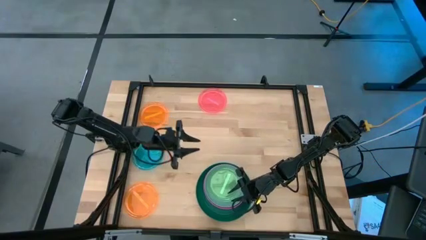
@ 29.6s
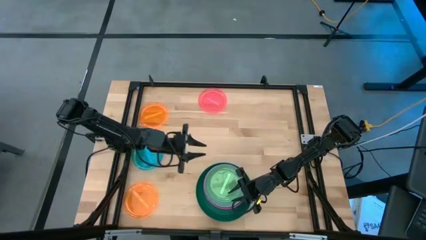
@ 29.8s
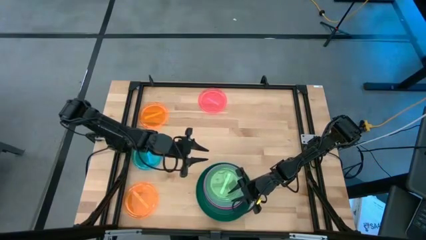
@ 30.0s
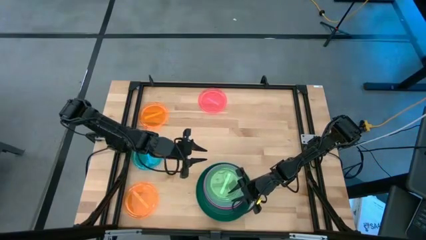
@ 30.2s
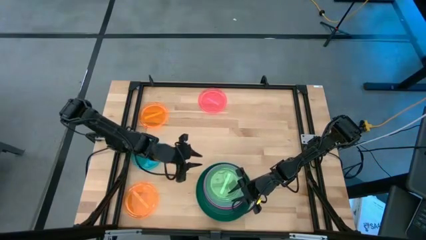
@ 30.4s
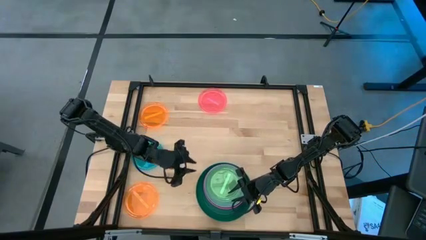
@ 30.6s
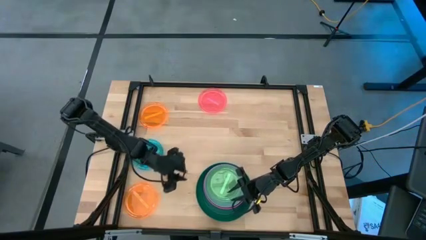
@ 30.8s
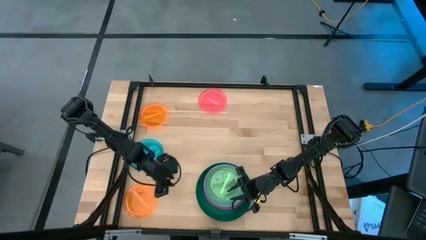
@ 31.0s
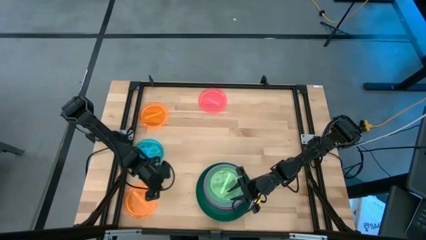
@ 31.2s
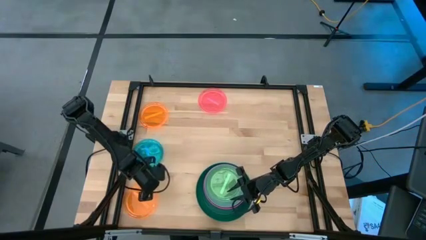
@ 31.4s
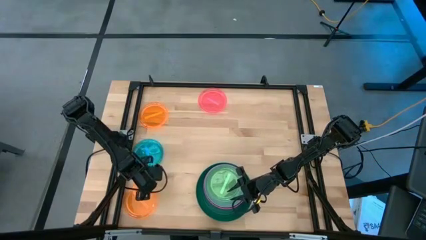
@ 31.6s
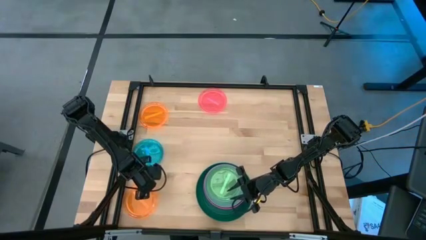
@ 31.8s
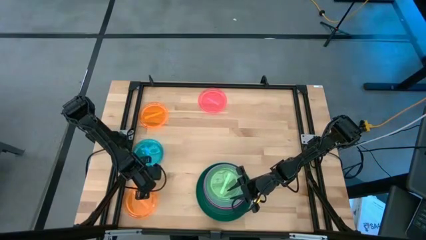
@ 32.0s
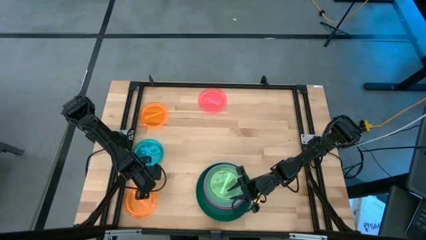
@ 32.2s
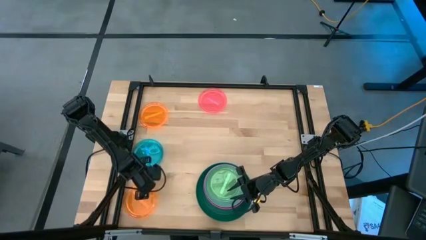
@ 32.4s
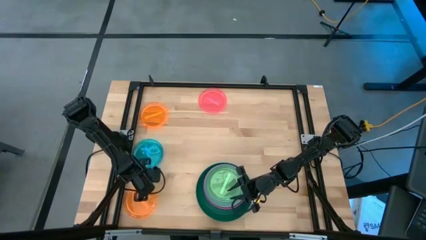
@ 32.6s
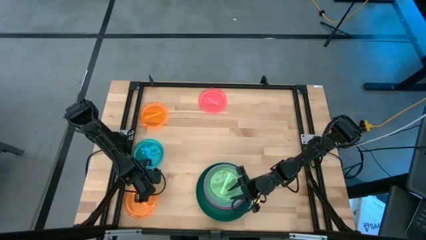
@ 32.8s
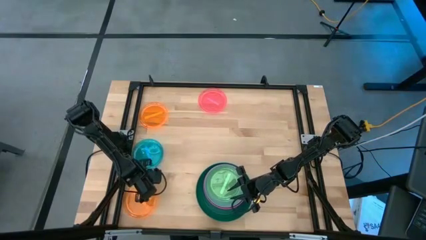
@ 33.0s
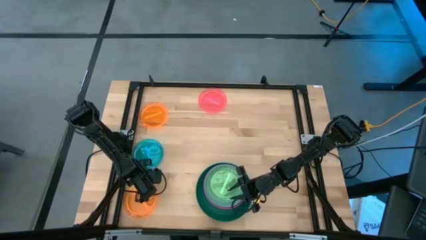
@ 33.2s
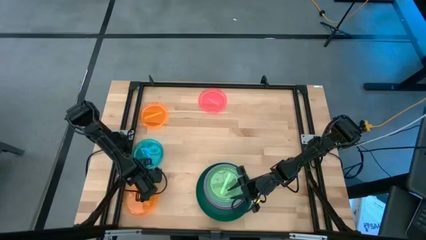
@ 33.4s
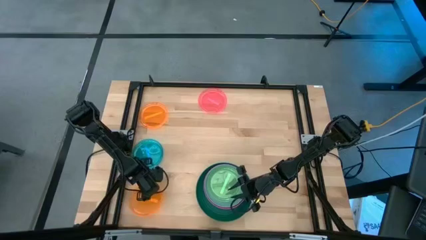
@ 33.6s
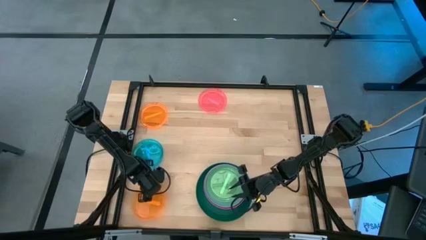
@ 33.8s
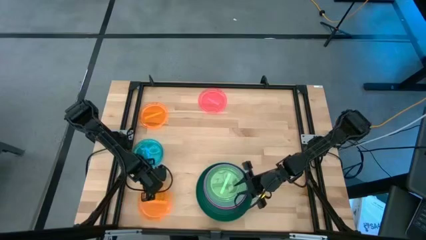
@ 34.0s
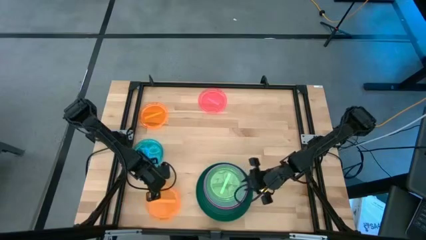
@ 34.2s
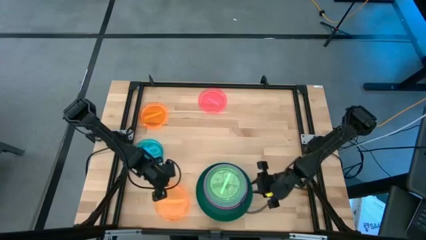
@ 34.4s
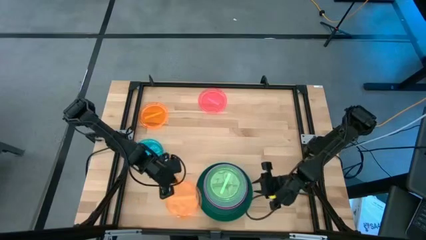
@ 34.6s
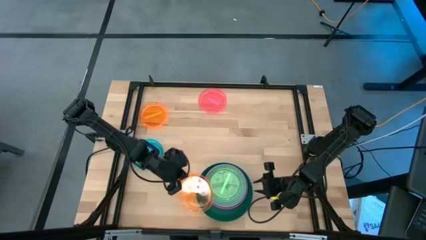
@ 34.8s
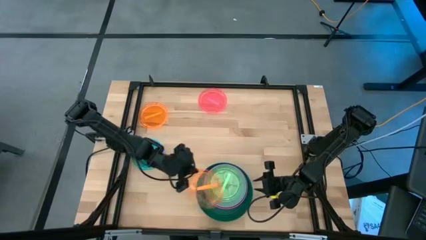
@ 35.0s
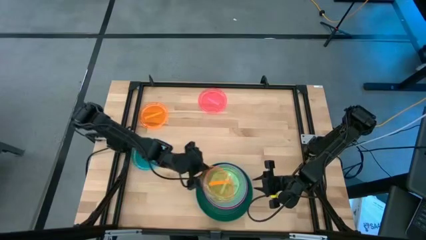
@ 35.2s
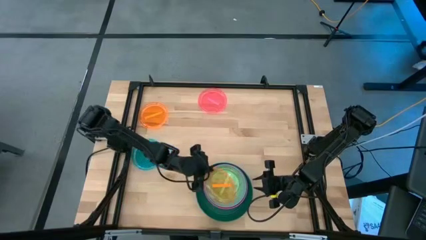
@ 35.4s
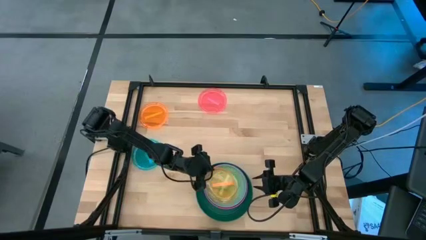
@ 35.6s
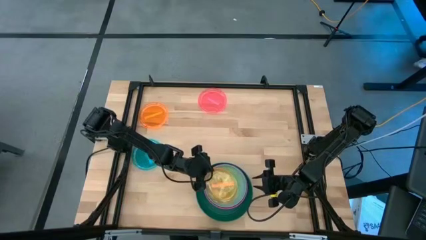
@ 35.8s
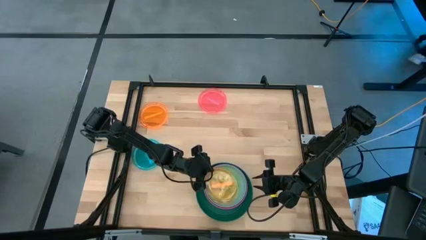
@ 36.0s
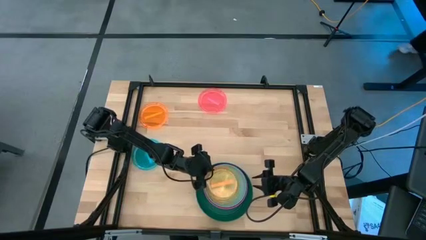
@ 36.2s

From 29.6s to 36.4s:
Task: Stack plastic plates
Stack the bottom orange transparent plate on top of the green transparent plate

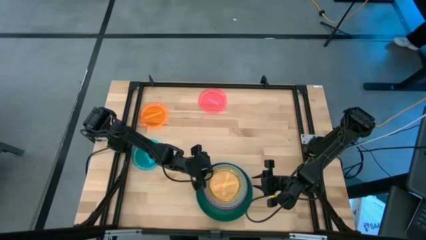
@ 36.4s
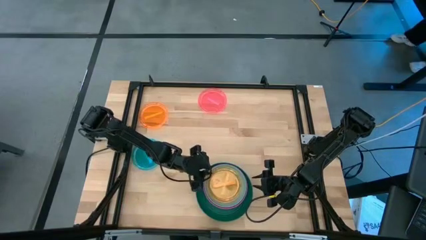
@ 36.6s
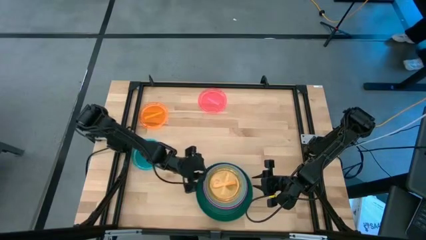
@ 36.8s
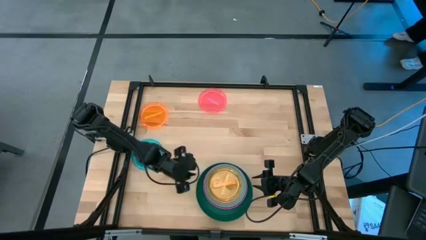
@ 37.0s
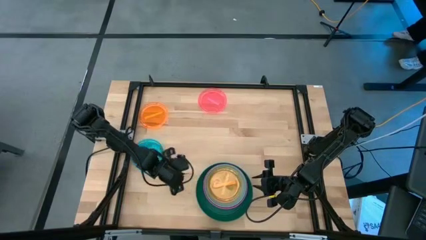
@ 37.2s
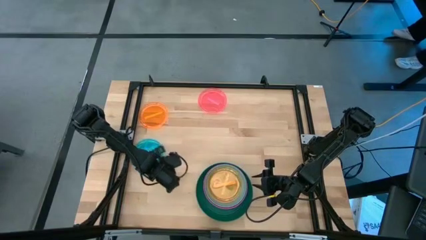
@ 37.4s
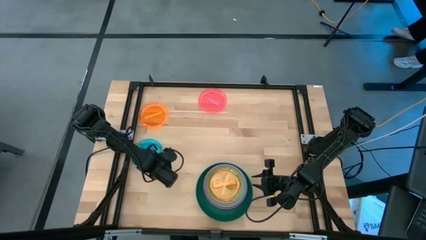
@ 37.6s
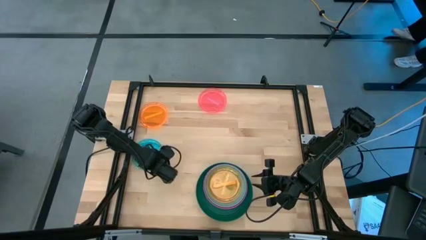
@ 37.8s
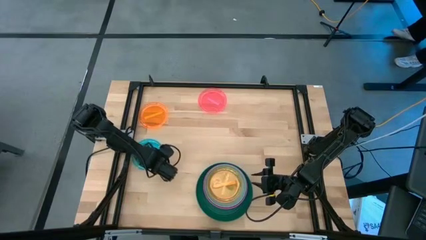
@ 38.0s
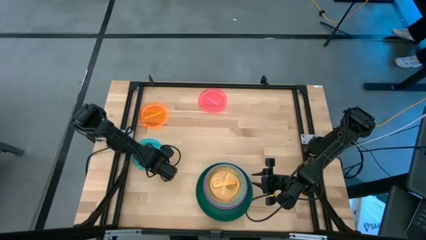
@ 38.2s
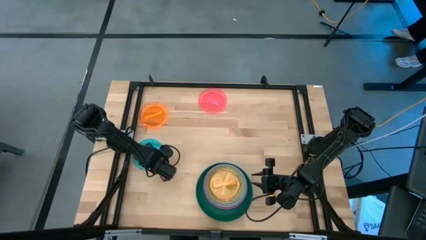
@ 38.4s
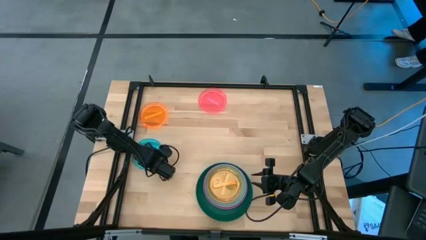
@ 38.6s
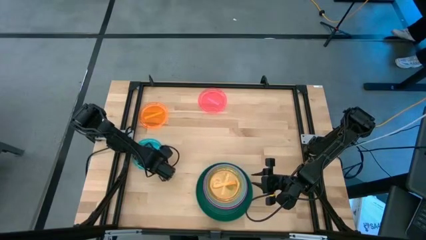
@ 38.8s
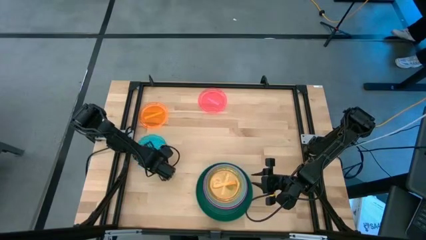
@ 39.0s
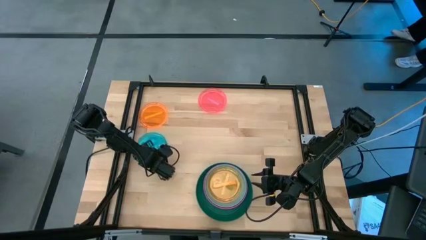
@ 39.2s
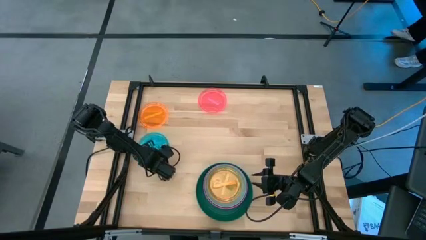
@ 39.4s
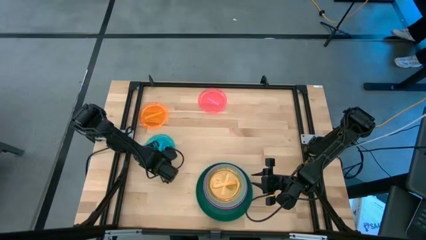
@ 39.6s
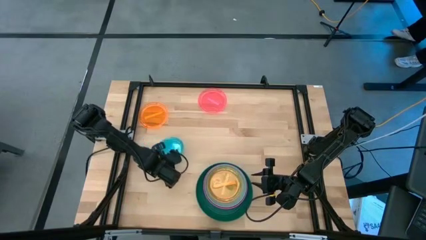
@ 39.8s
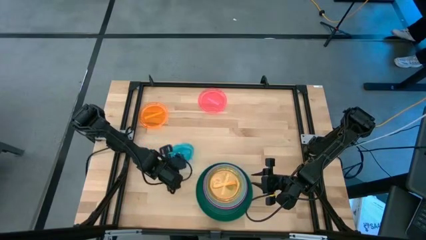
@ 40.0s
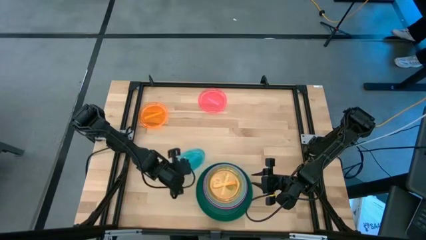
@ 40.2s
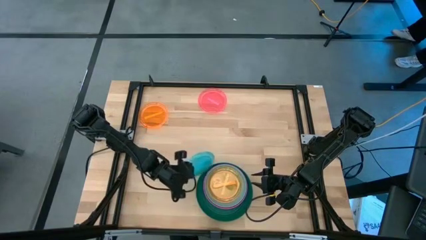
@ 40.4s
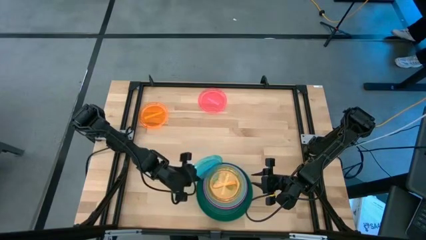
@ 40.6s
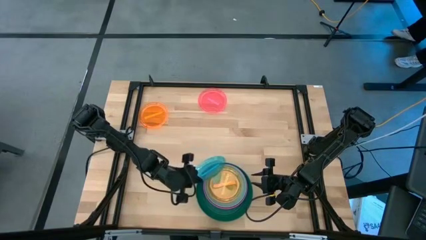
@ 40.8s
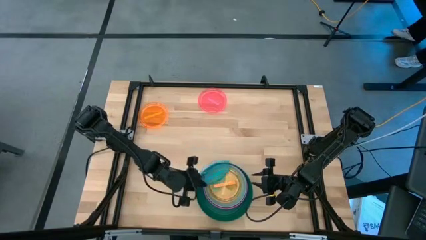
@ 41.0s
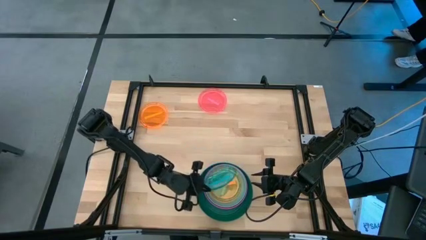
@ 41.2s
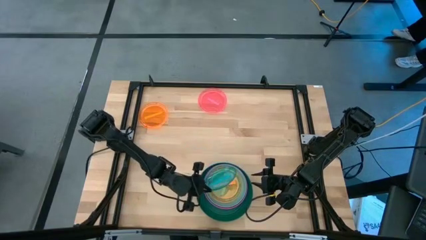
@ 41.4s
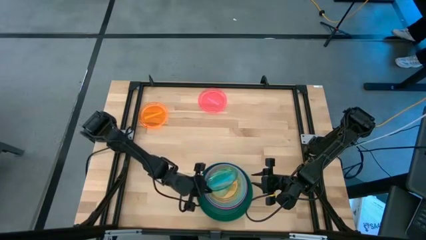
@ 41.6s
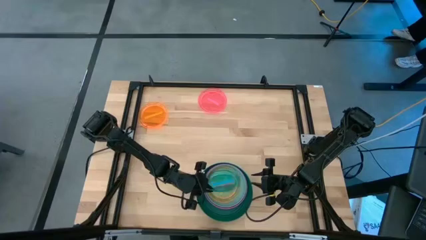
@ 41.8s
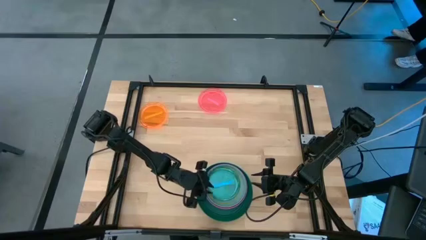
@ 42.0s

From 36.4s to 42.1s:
Stack the blue transparent plate on top of the bottom orange transparent plate

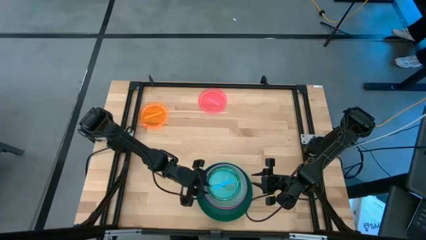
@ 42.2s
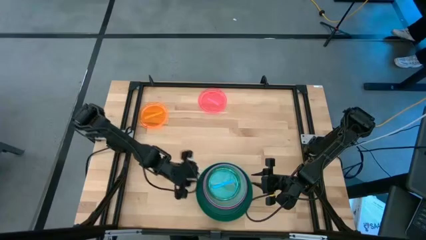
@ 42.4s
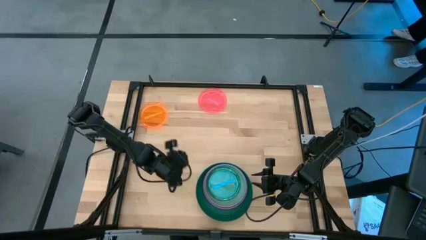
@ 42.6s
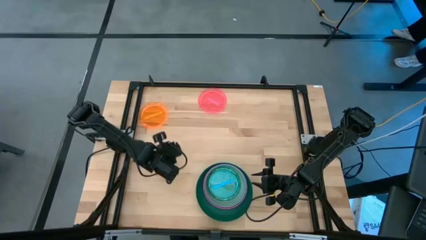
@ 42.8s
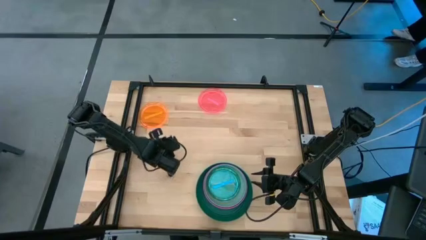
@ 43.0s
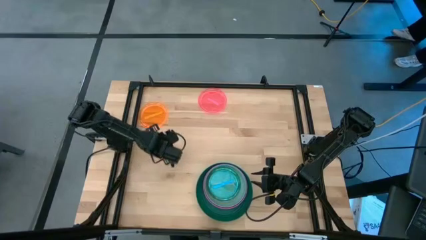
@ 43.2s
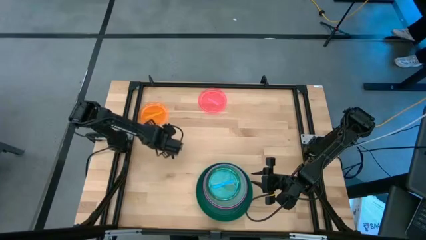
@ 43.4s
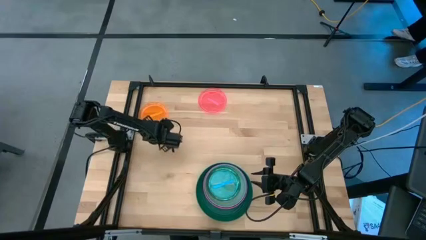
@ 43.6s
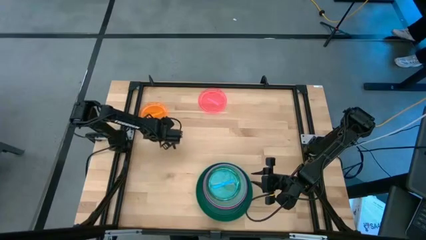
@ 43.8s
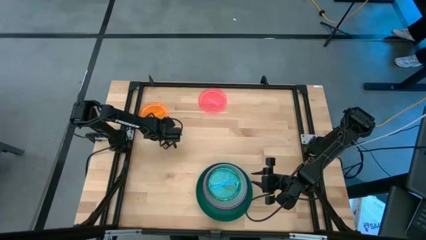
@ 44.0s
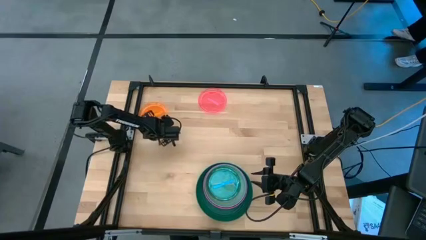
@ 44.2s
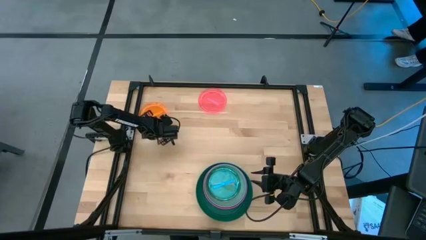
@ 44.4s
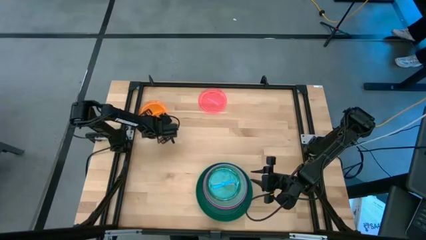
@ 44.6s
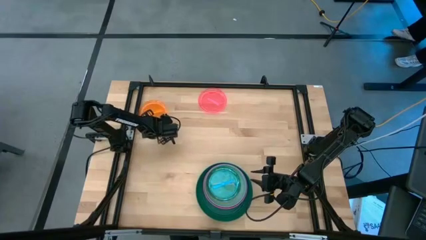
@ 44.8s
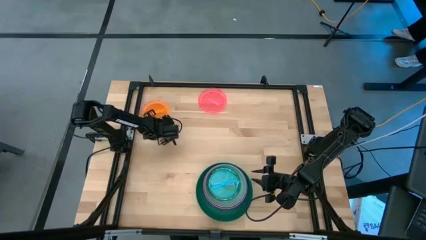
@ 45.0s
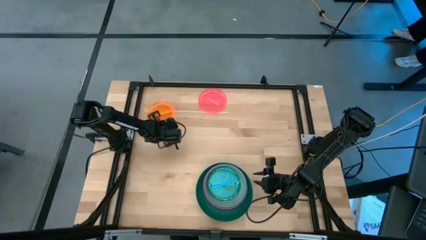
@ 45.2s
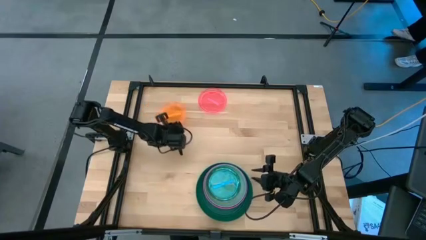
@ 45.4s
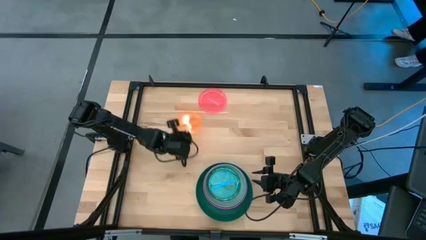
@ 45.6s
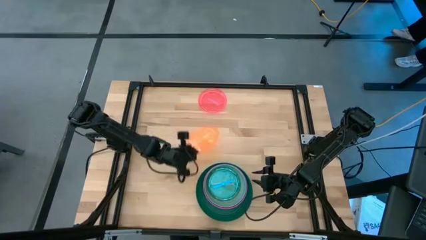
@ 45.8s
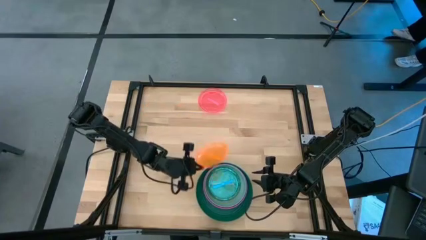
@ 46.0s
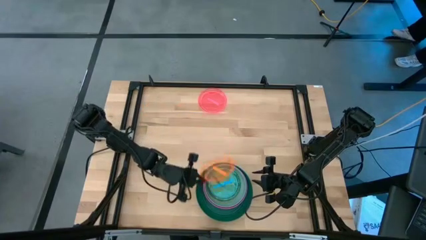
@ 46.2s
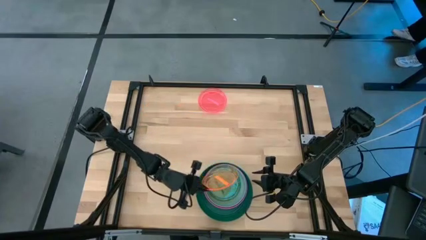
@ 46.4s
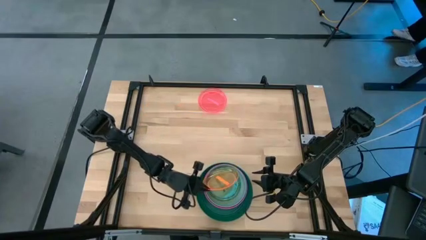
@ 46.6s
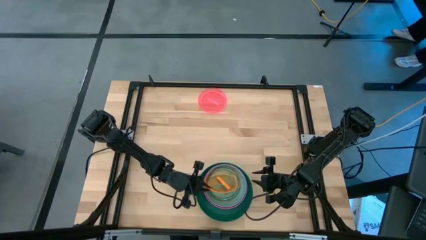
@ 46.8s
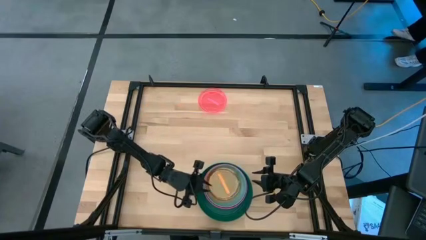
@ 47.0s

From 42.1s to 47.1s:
Stack the orange transparent plate on top of the blue transparent plate
